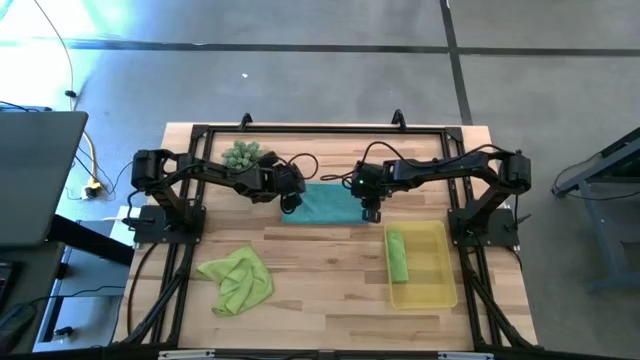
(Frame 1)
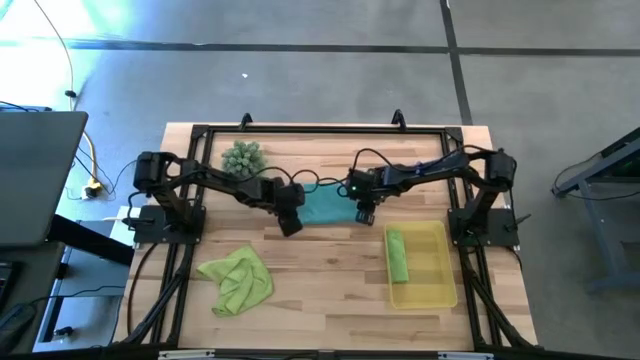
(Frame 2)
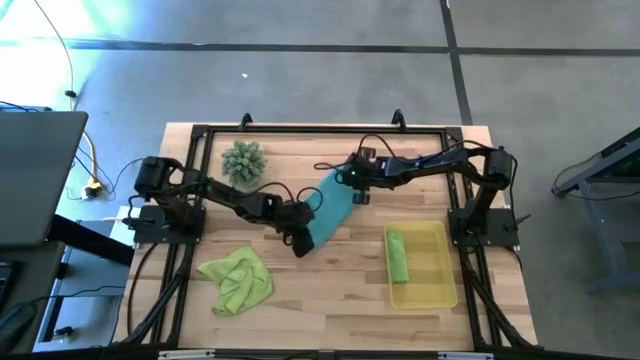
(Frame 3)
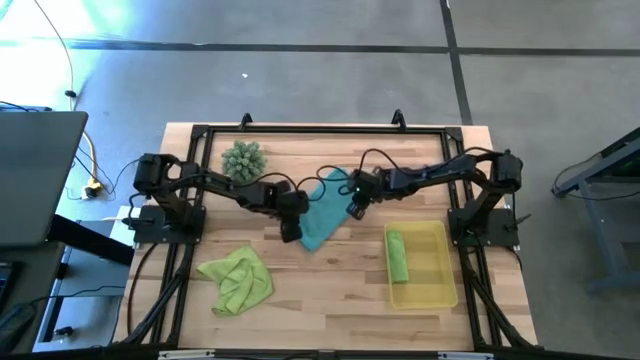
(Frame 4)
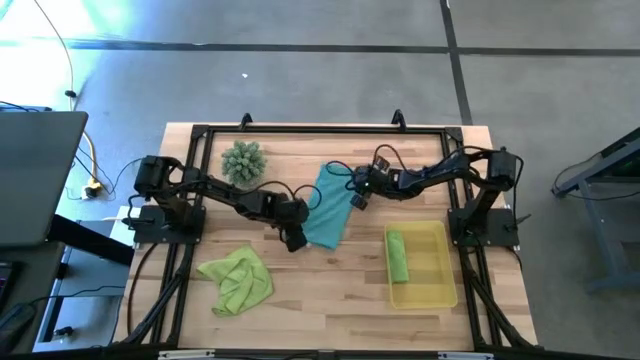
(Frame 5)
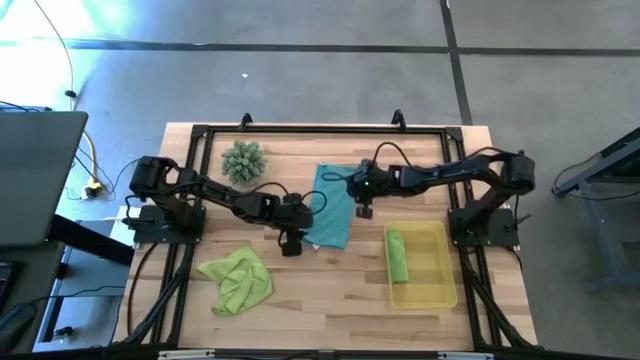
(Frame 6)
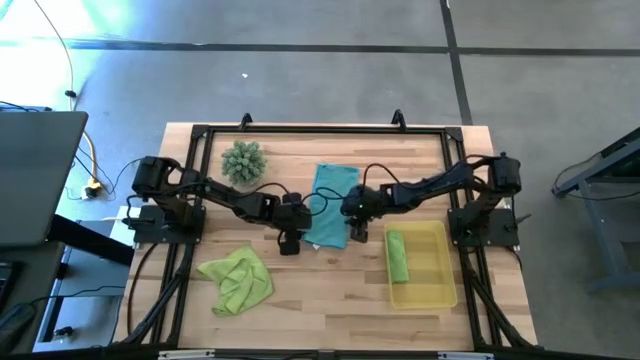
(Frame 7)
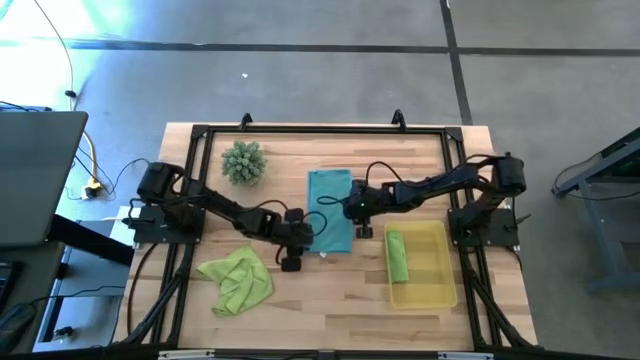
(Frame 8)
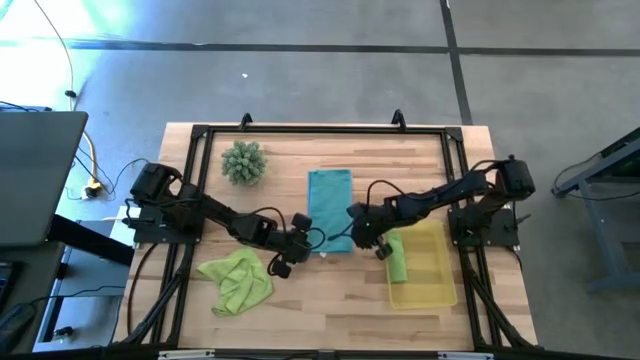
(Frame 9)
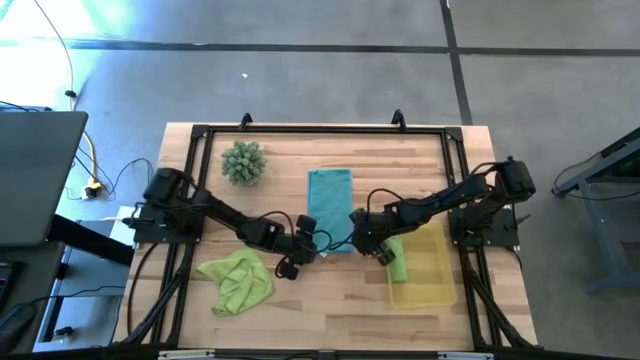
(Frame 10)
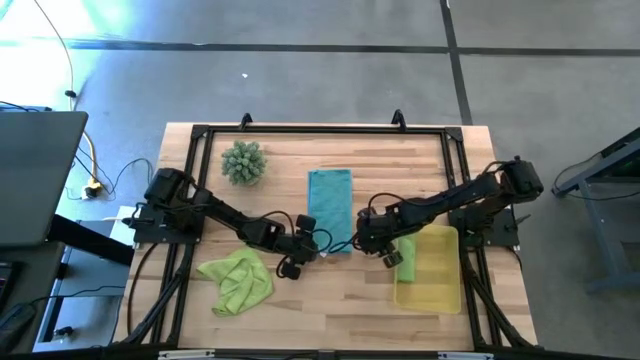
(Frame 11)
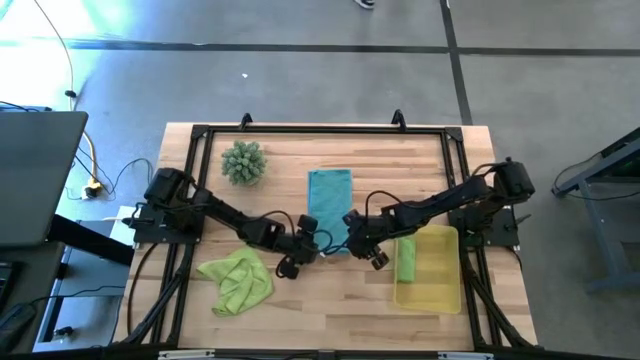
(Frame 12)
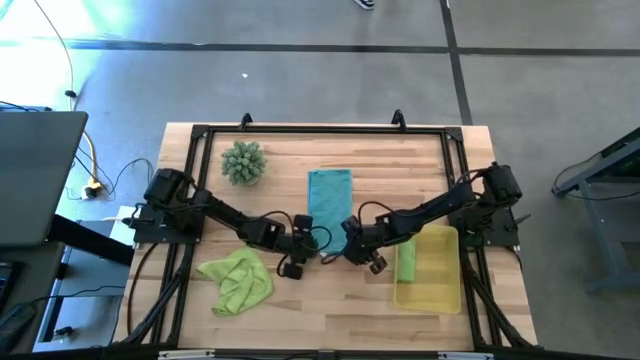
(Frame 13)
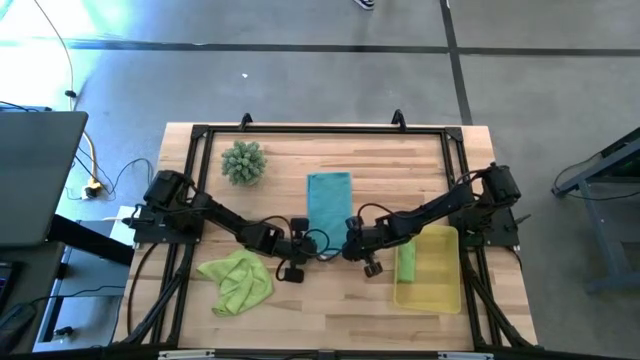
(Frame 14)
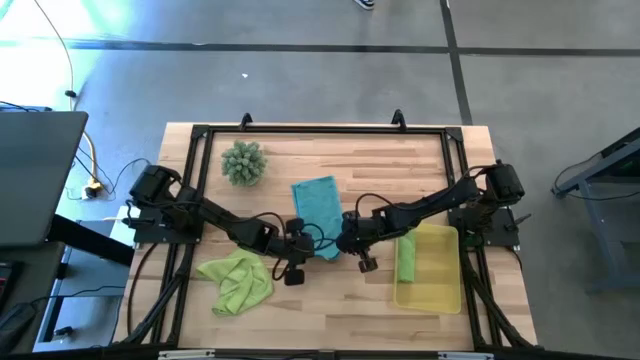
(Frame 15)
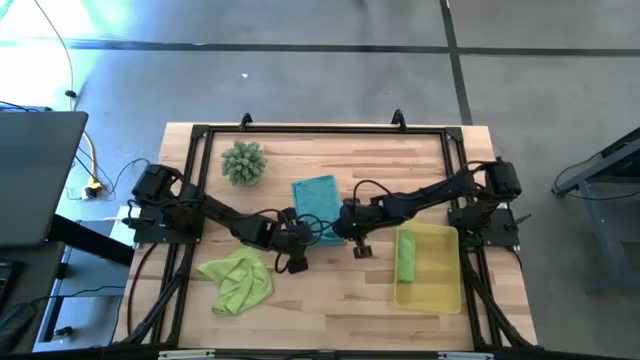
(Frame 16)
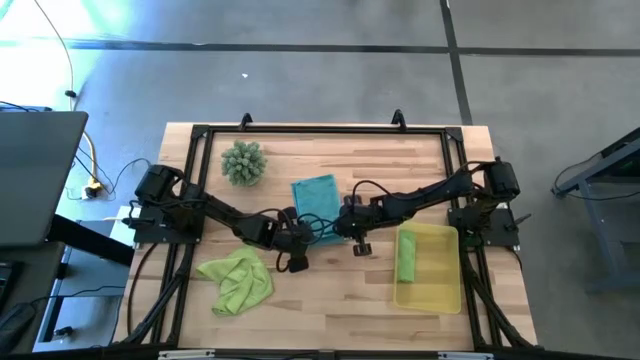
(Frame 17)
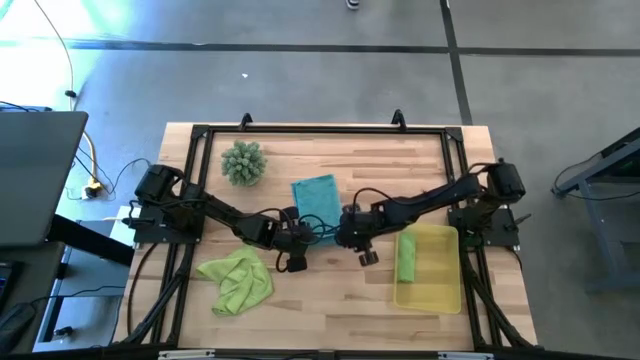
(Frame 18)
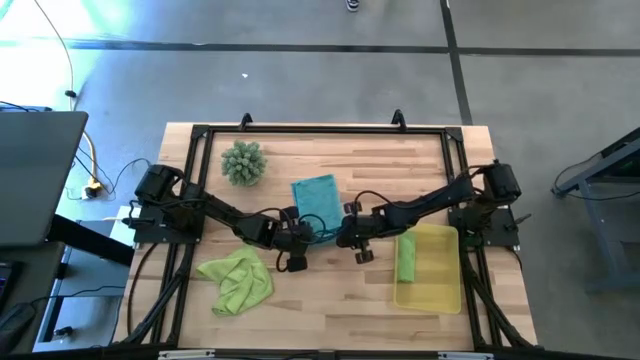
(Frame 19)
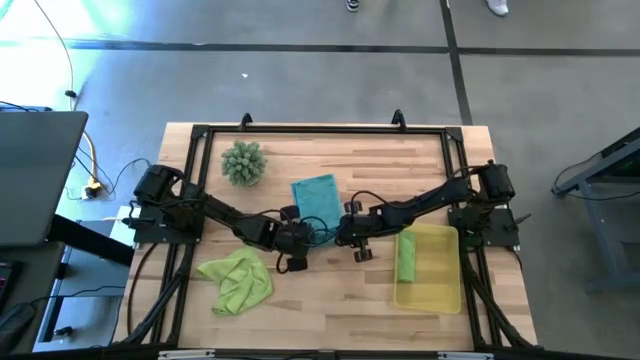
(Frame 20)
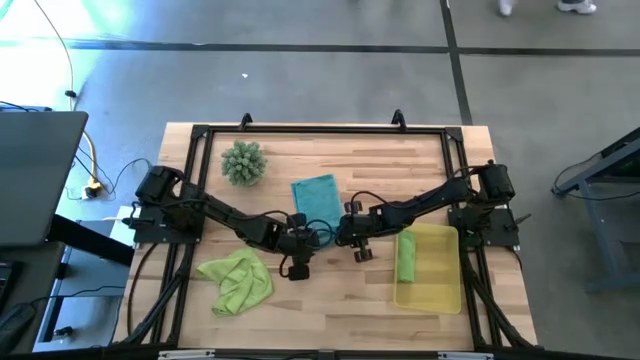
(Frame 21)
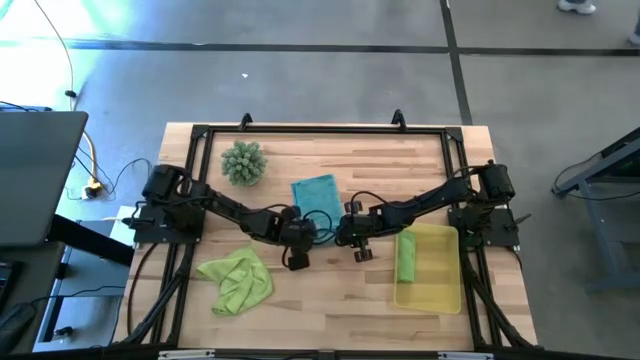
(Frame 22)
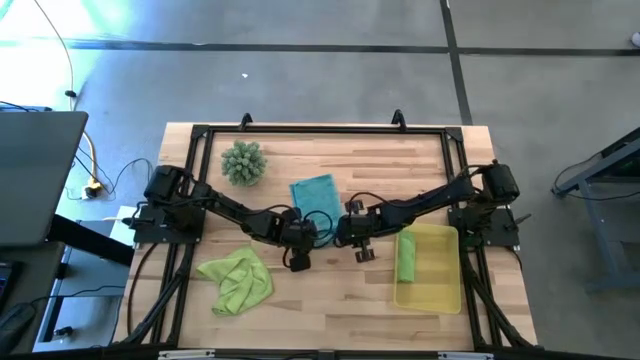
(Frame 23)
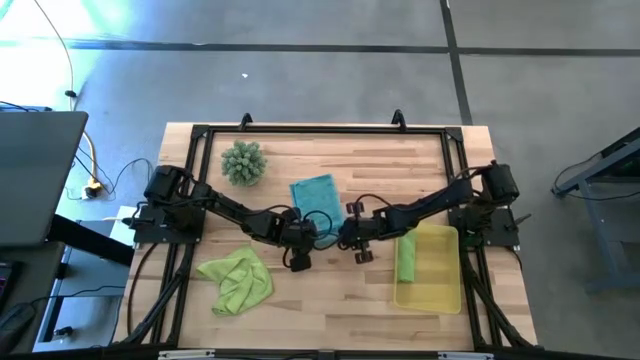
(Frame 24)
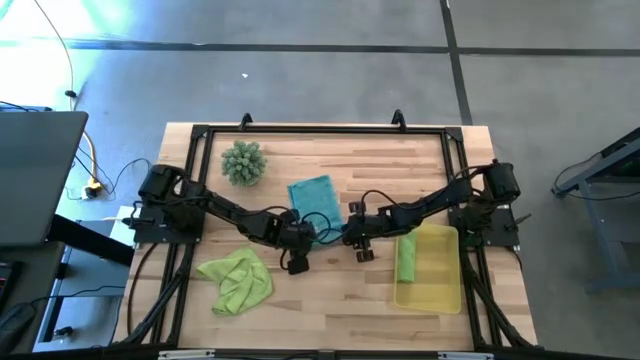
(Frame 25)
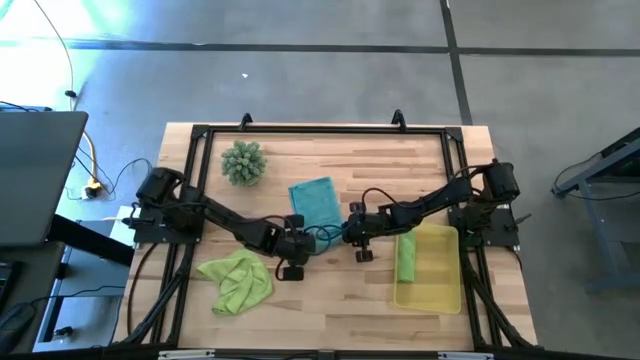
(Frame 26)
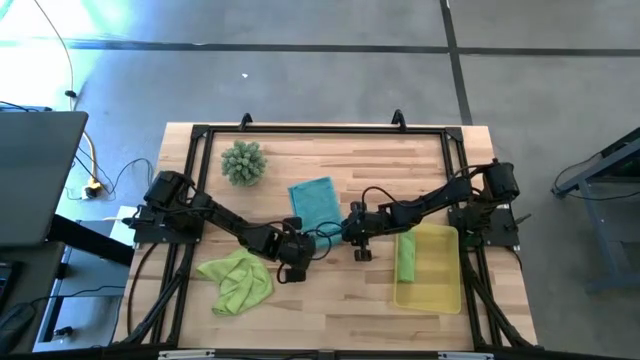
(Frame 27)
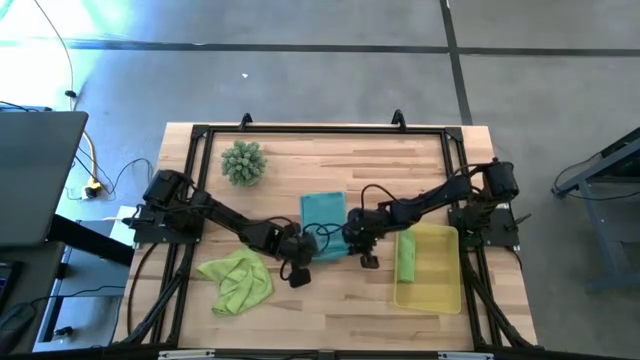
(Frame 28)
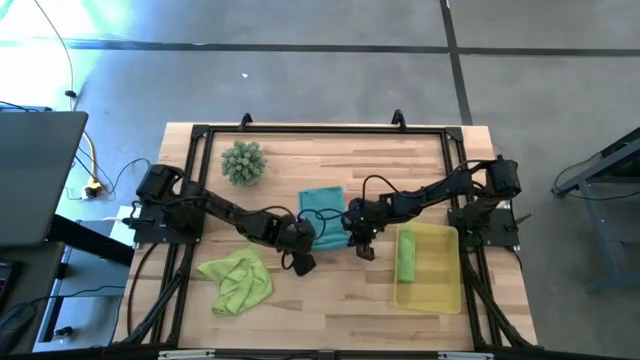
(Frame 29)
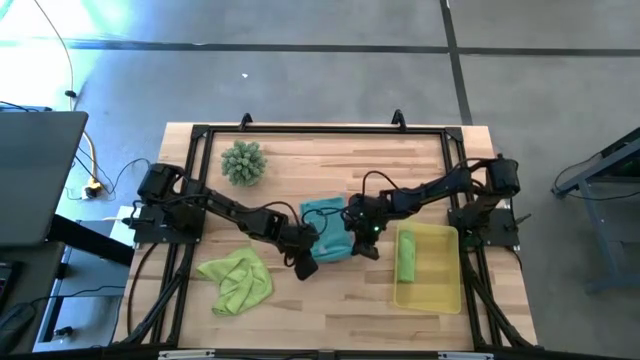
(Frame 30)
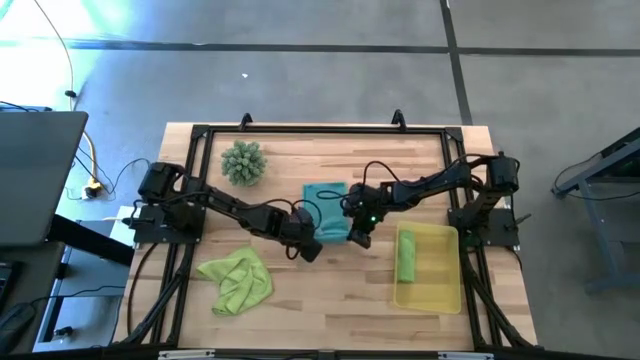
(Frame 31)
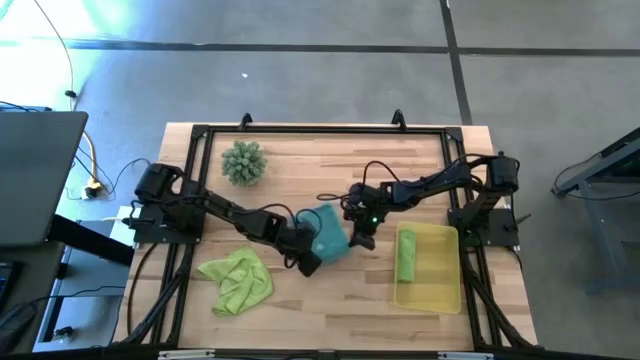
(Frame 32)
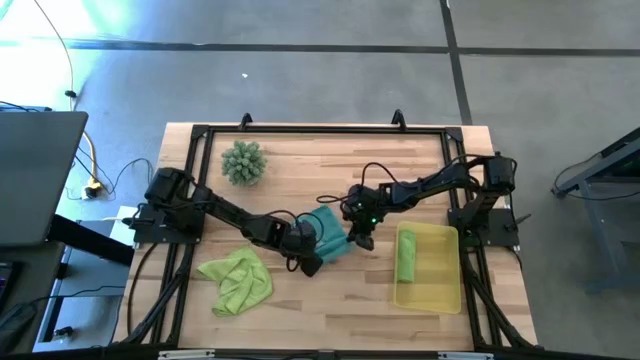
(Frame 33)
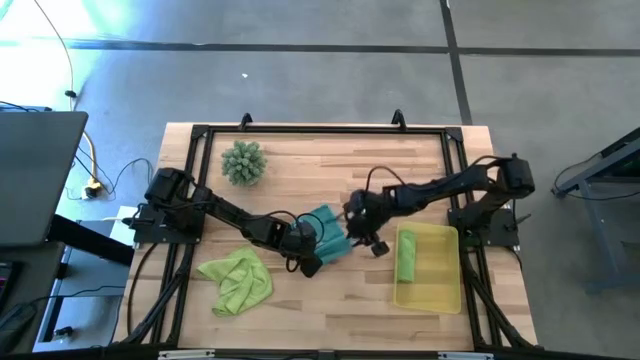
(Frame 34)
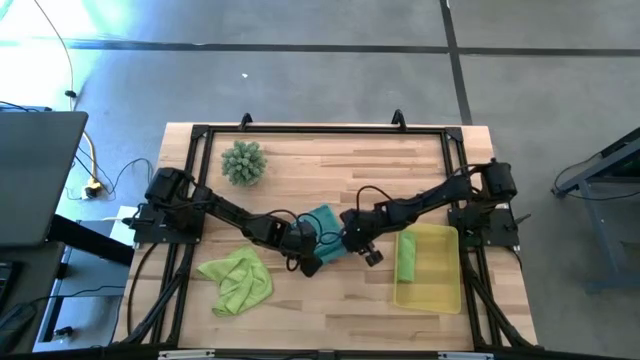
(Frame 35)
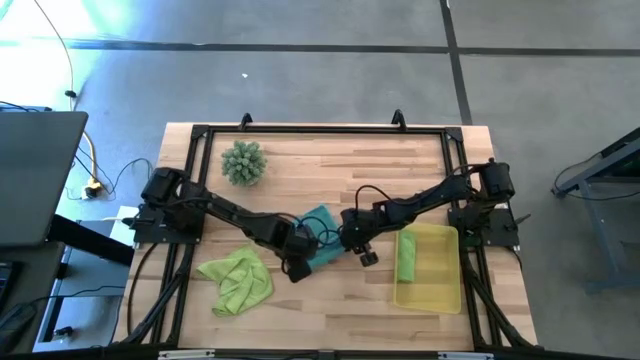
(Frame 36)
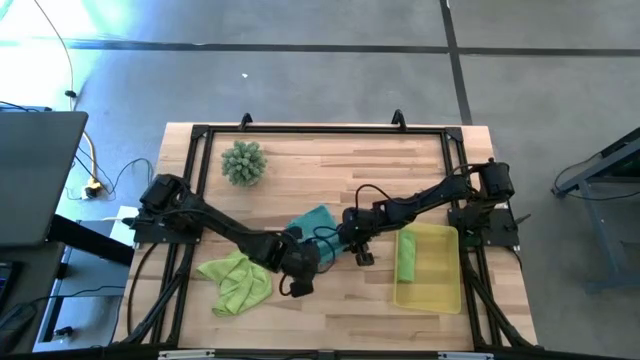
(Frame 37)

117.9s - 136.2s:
Task: Roll microfiber towels into tight, uniform cylinder then place into a basket
Roll the blue cloth

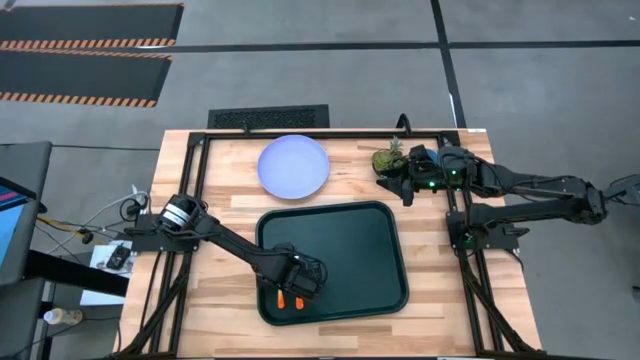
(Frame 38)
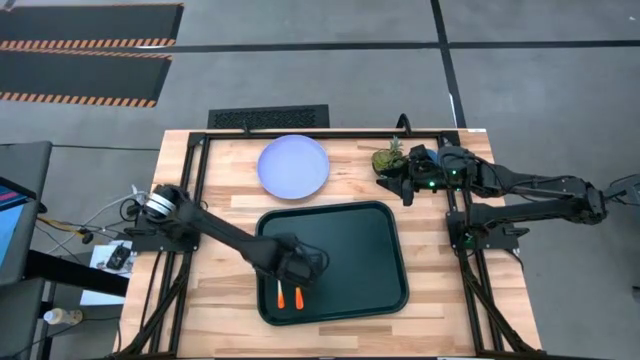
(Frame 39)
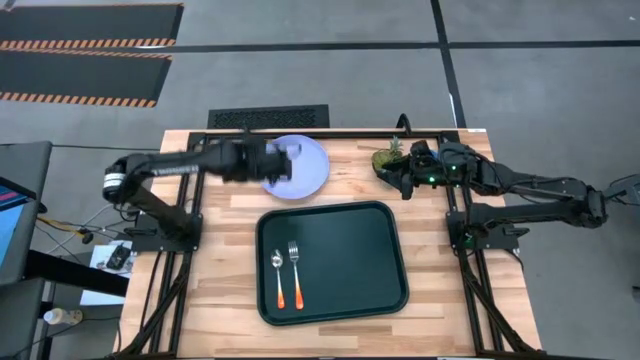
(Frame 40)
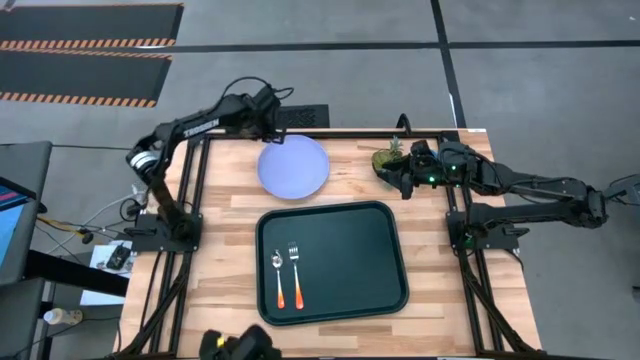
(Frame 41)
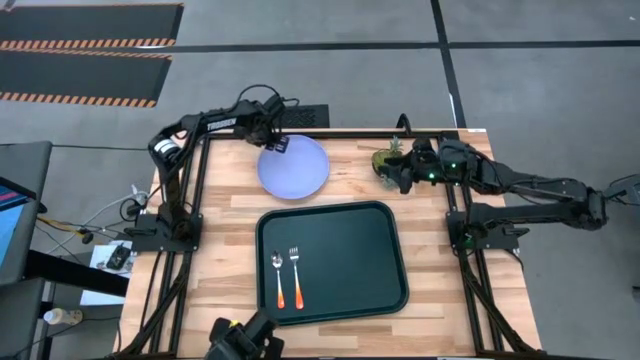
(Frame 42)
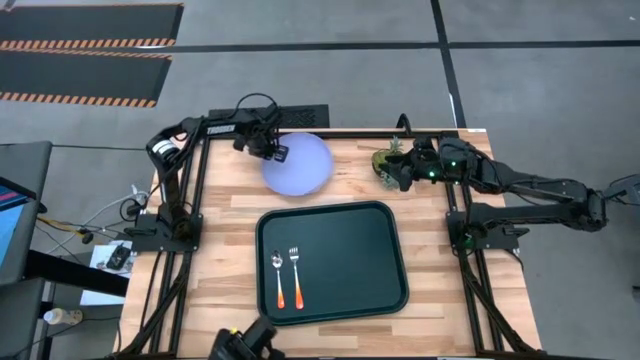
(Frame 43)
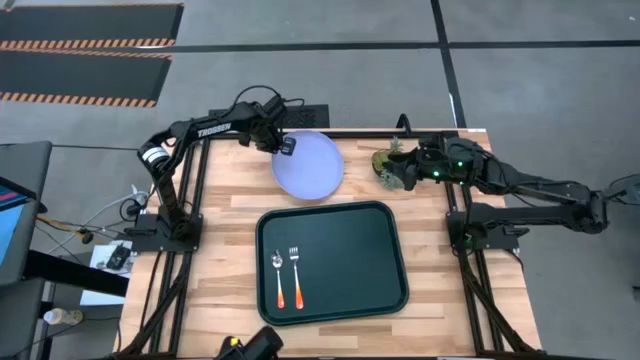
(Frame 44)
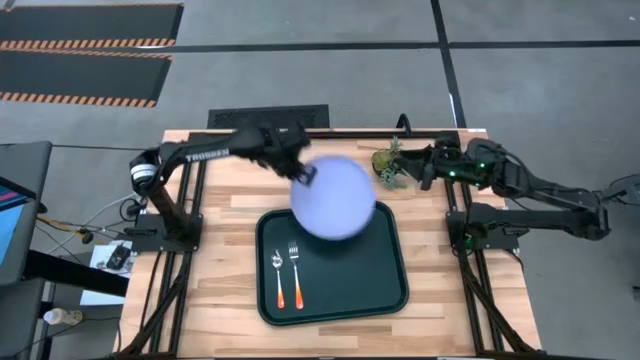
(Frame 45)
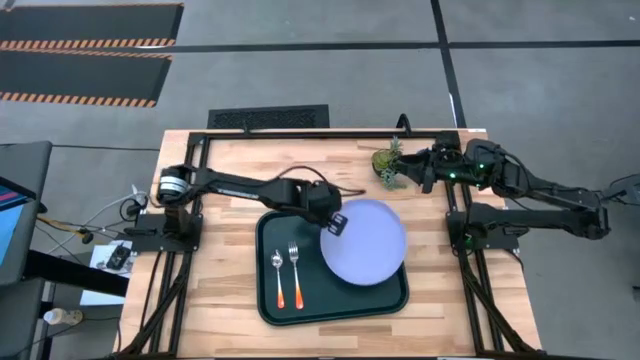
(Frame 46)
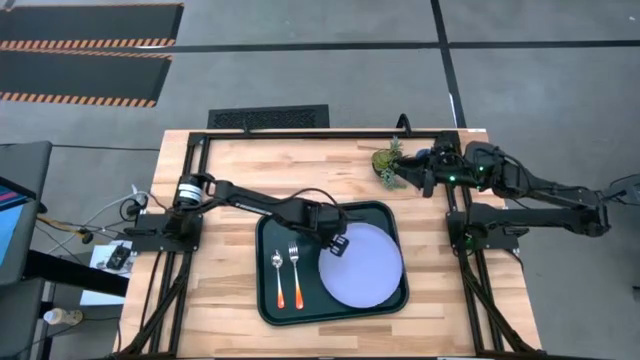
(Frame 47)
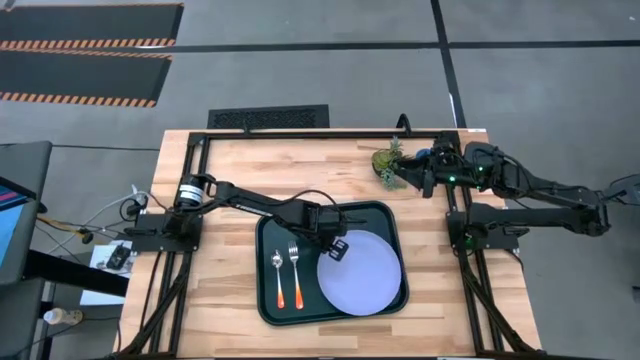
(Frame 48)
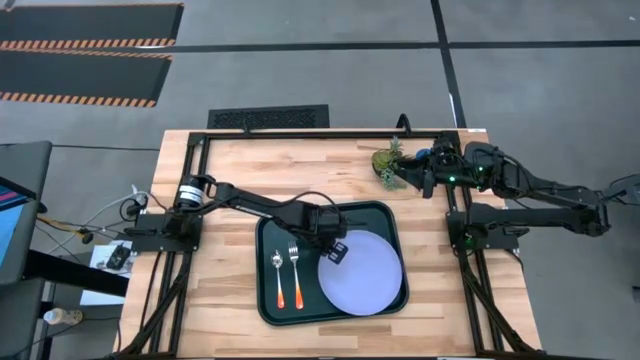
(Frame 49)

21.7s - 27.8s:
Task: Pick and place plate/cup/fork/spoon on tray
Put the light violet plate on the black tray to the right of the orange spoon
